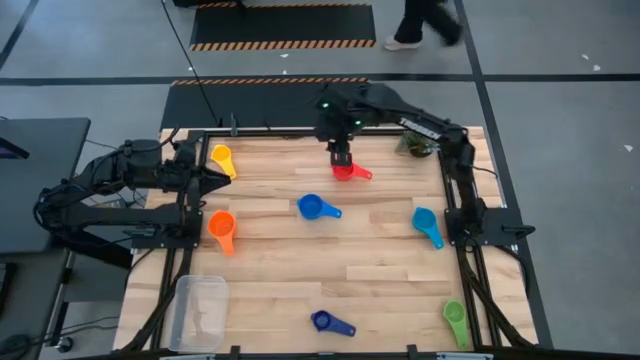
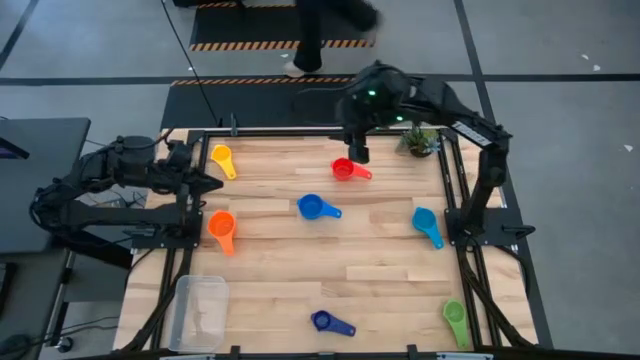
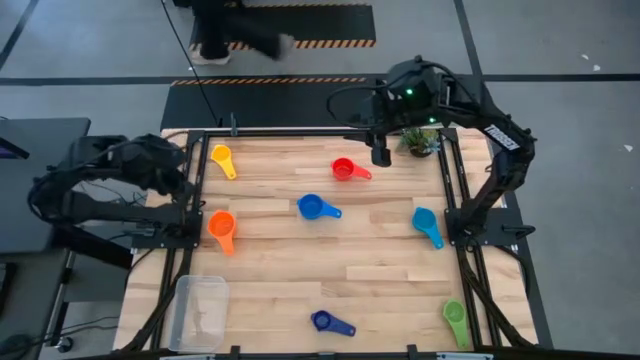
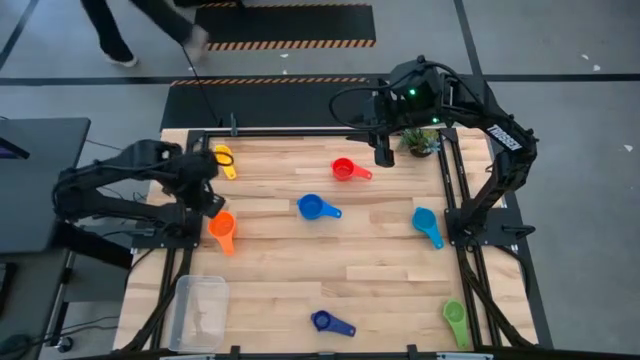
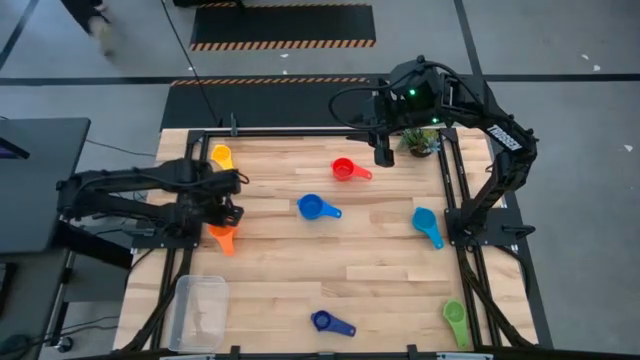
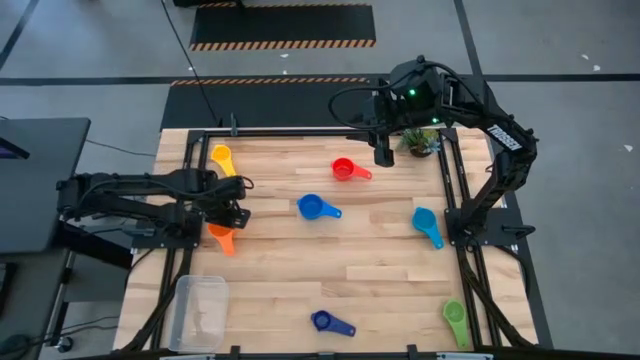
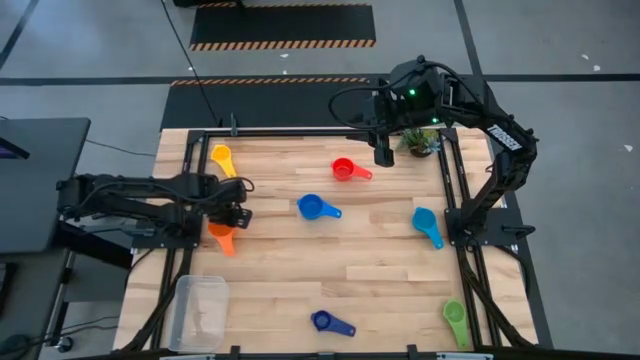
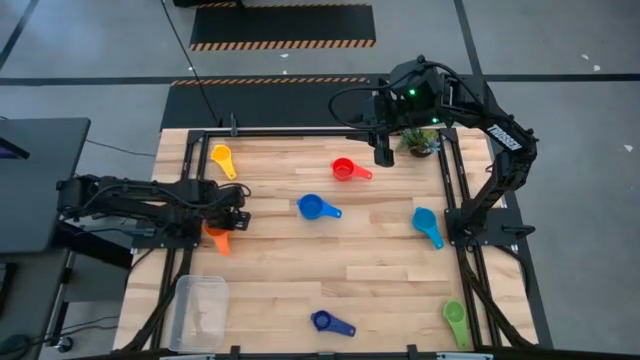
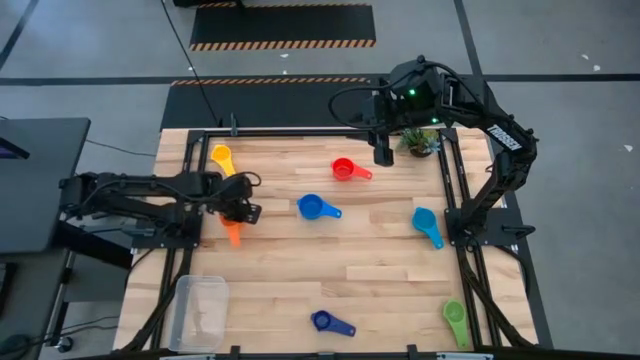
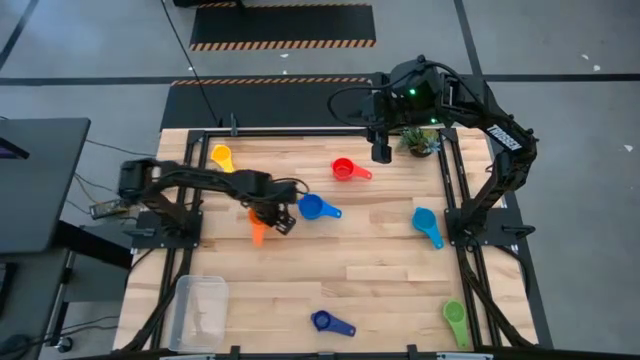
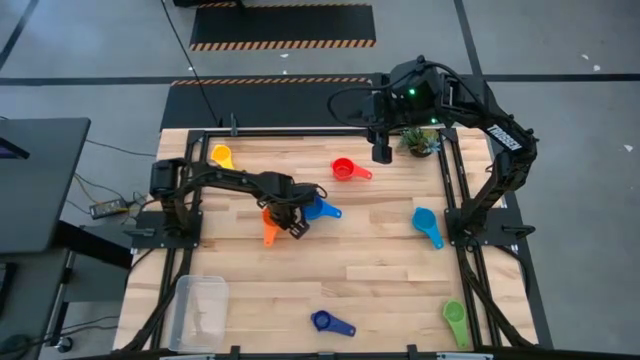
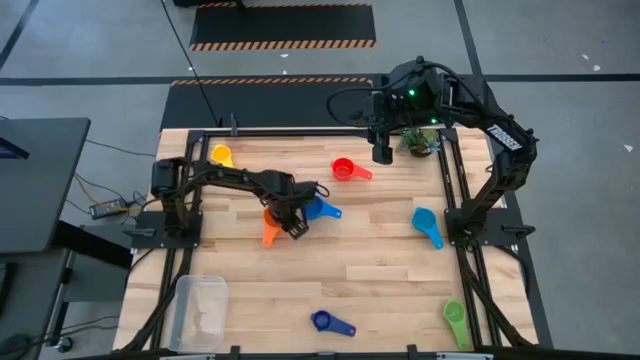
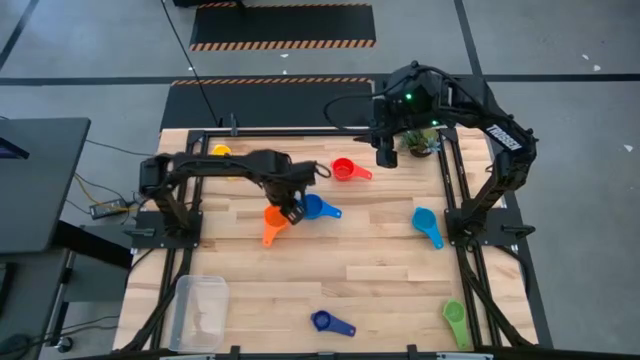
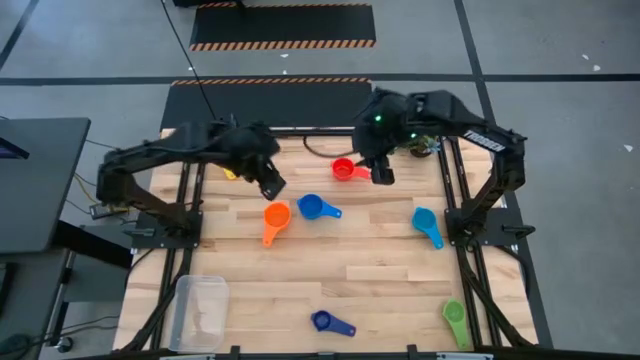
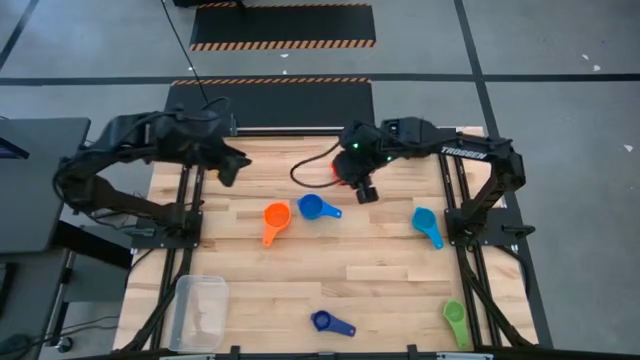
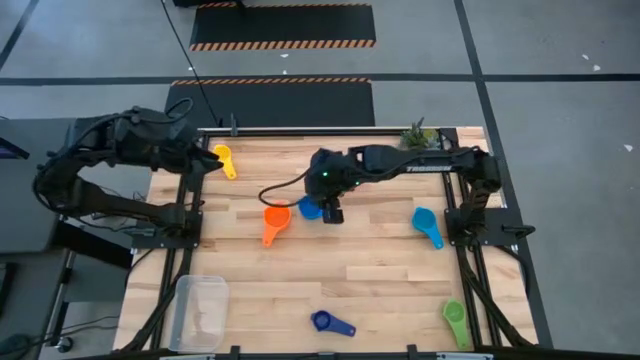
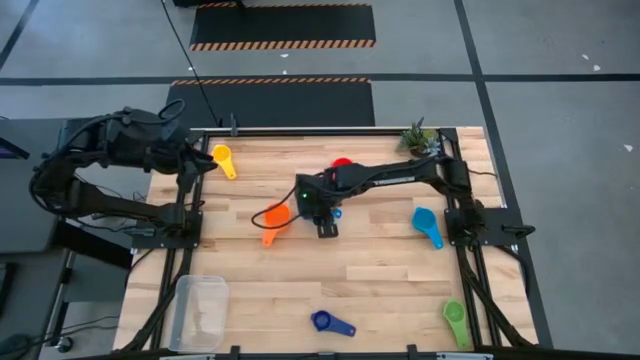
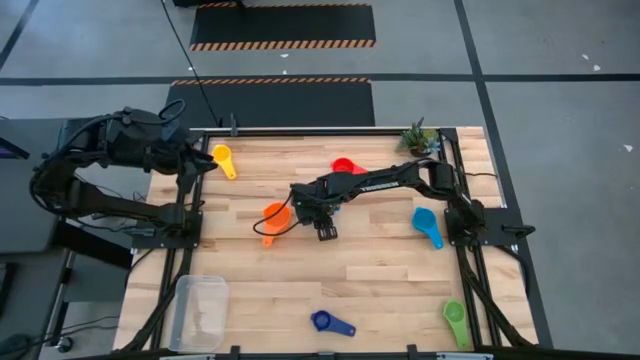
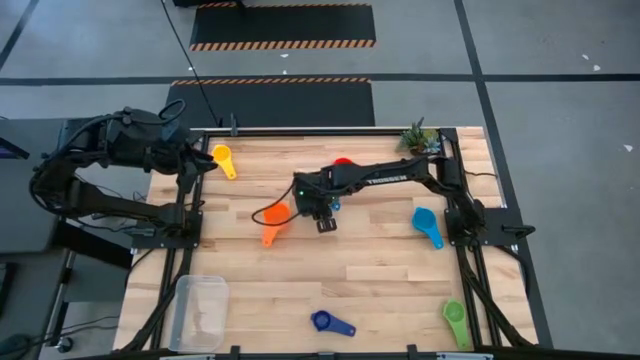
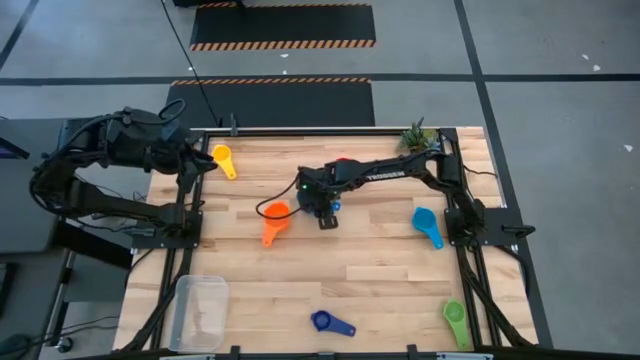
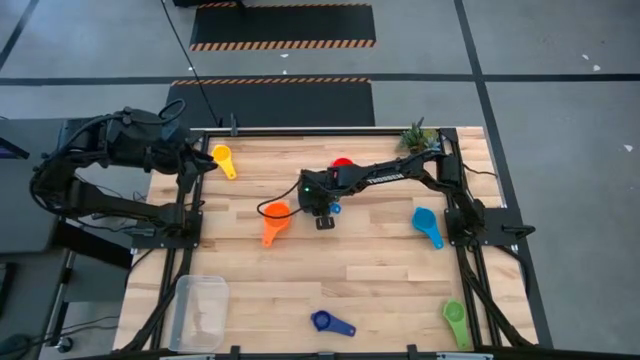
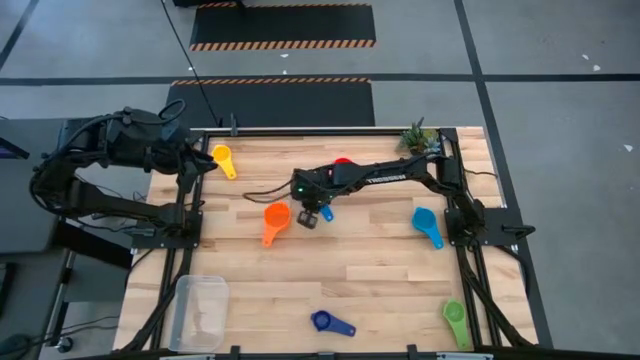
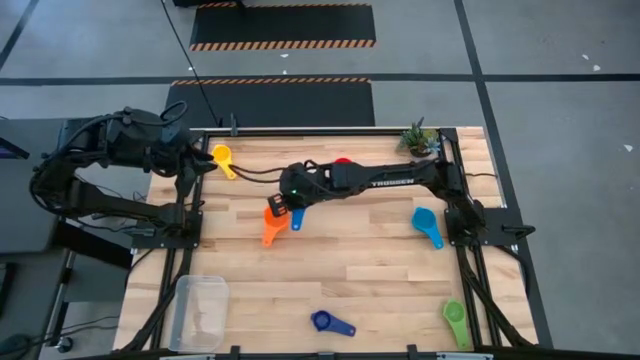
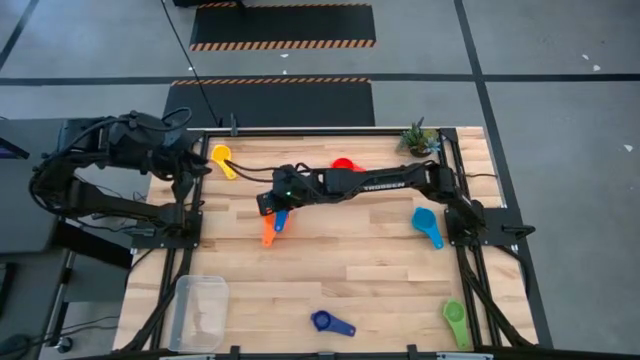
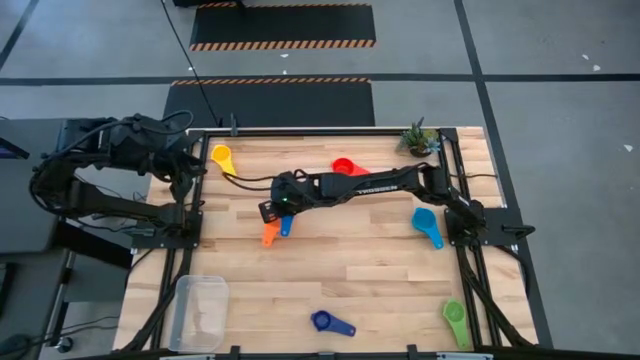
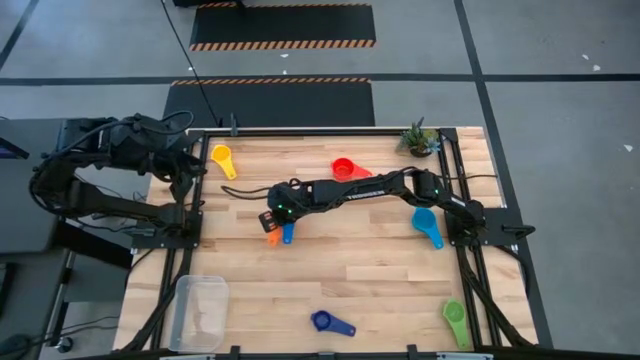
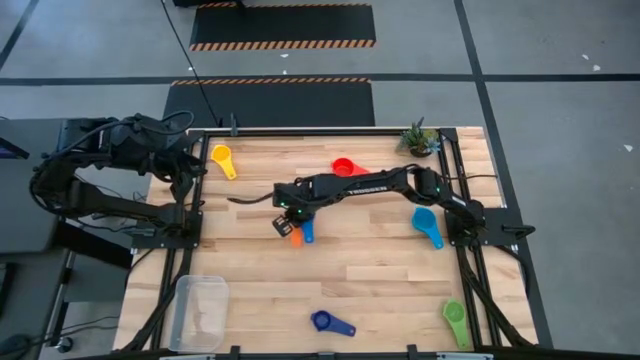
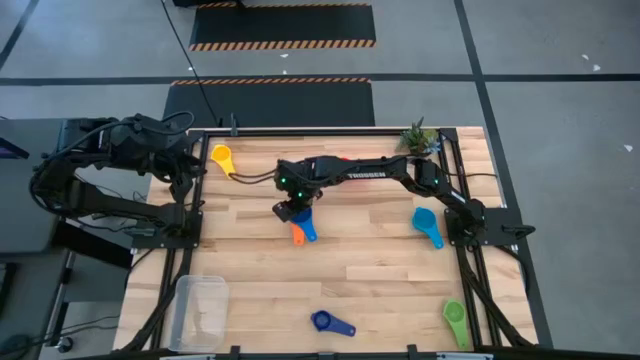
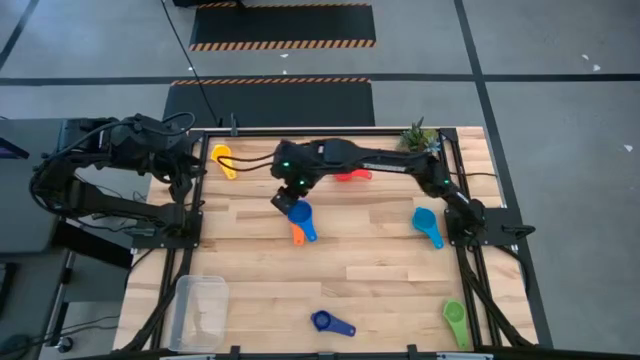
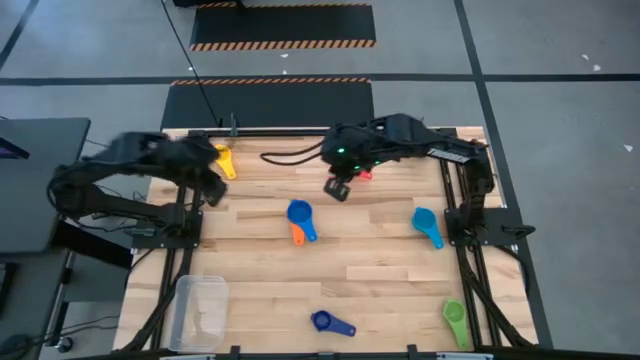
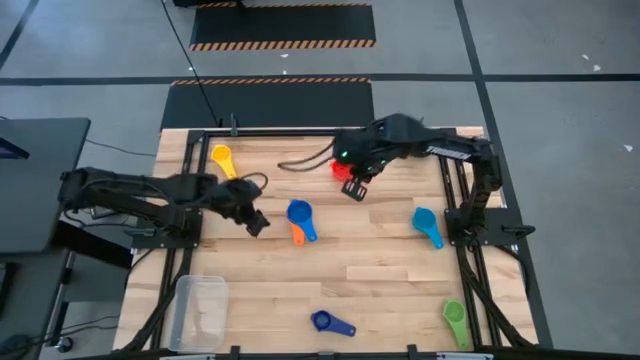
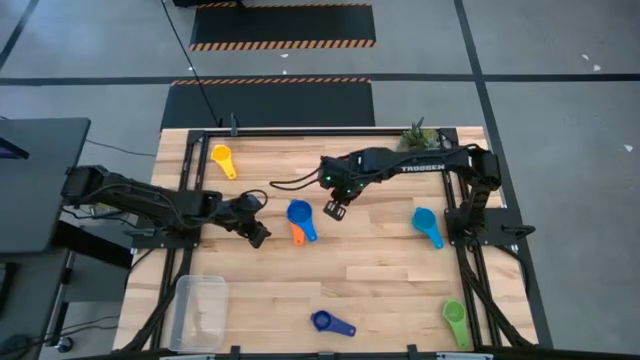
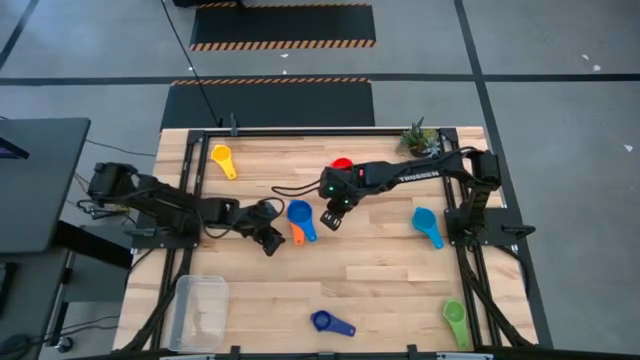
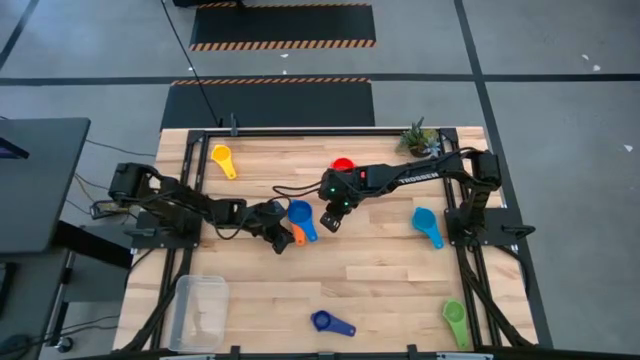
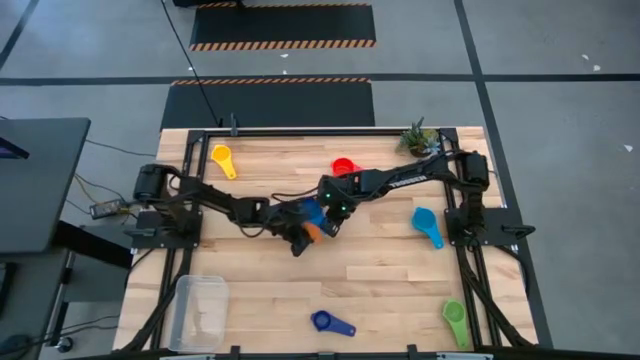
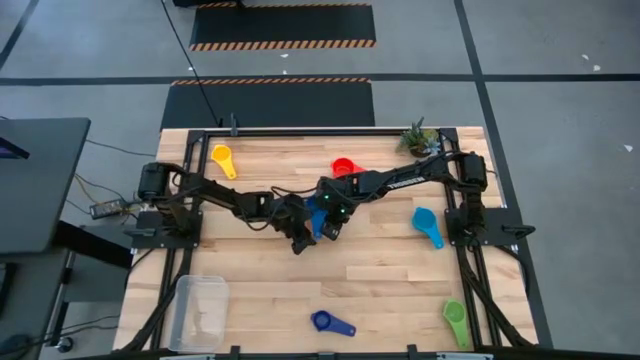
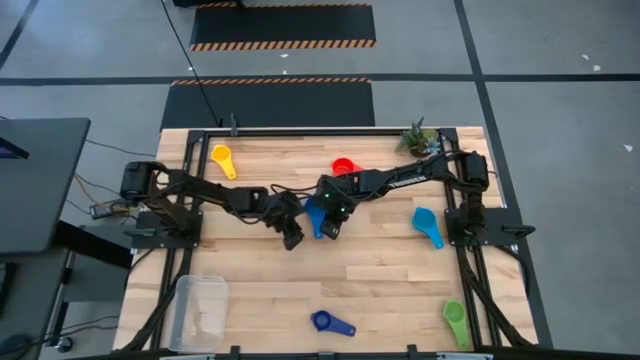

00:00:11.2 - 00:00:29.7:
Task: Nest measuring cups in basket
Stack the left blue measuring cup on top of the orange measuring cup

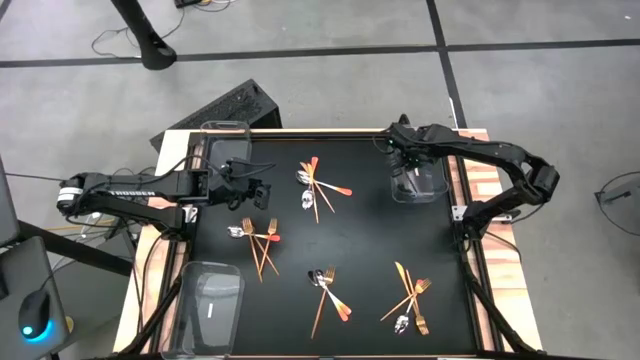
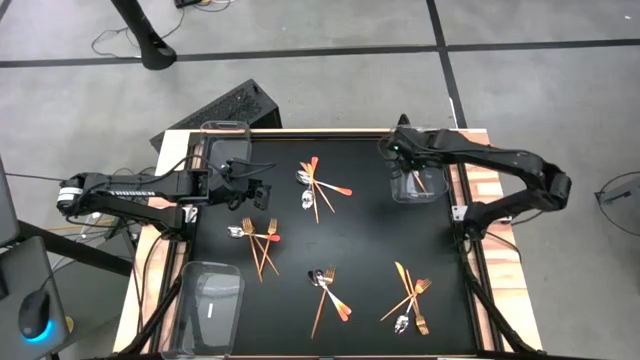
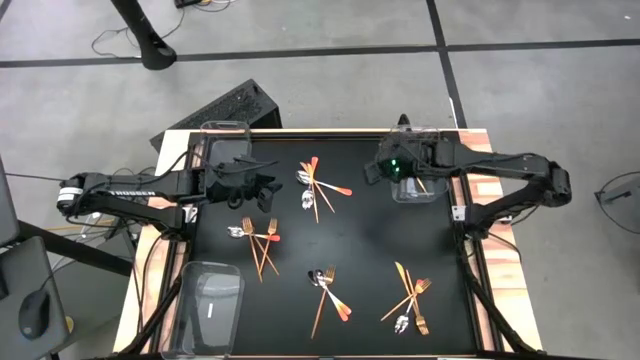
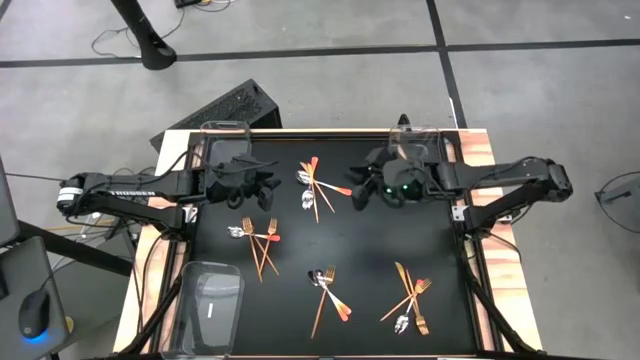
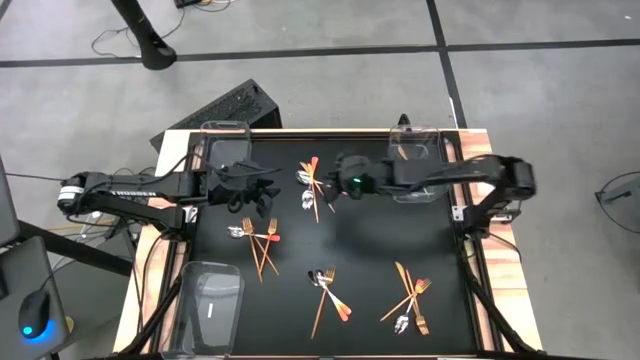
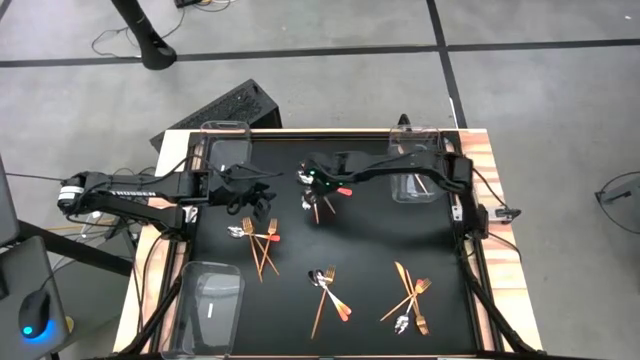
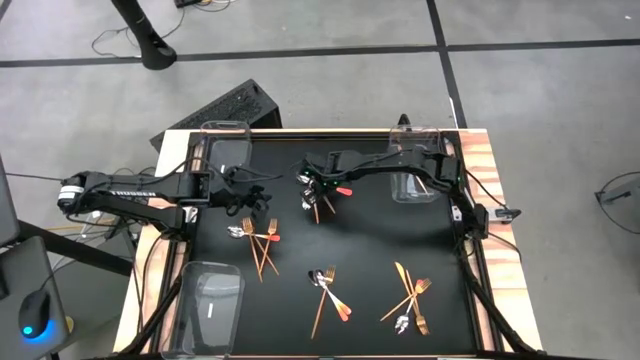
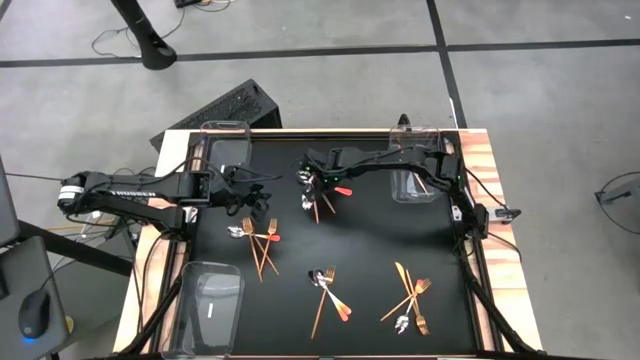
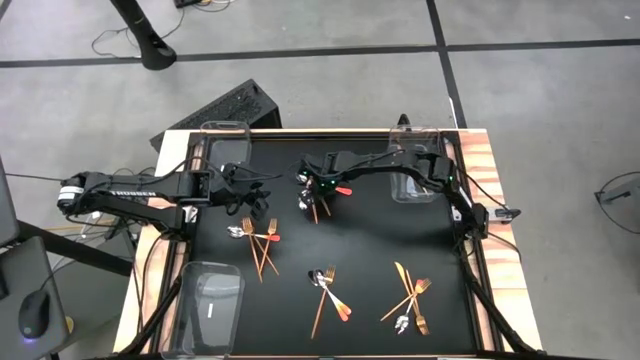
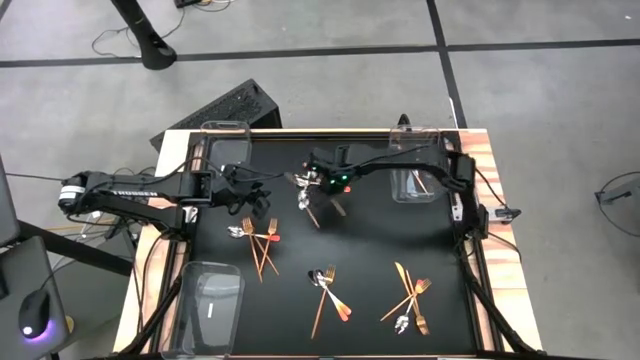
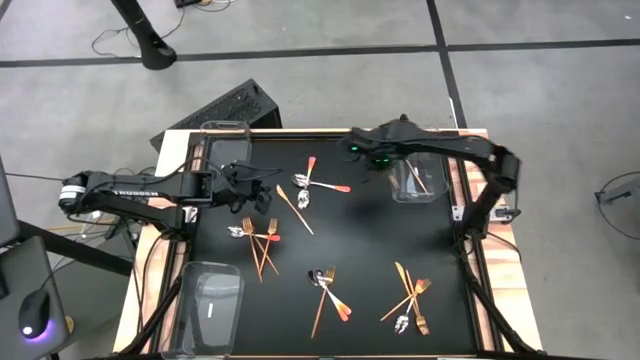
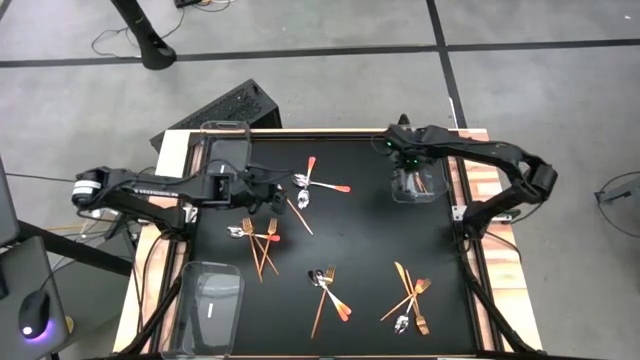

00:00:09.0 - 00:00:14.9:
Task: Sort silverware by color (type)
Put the gold table knife into the top right transparent bin
